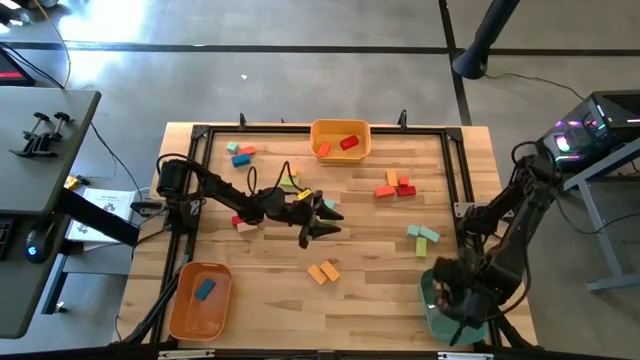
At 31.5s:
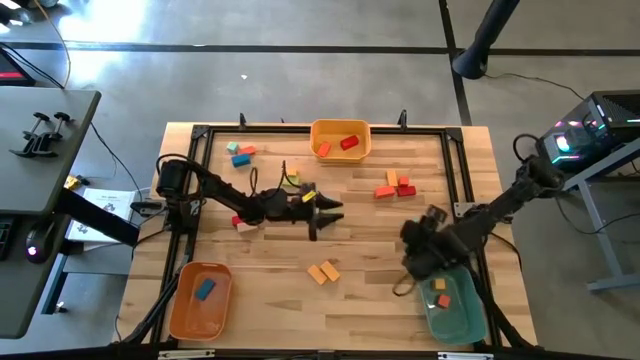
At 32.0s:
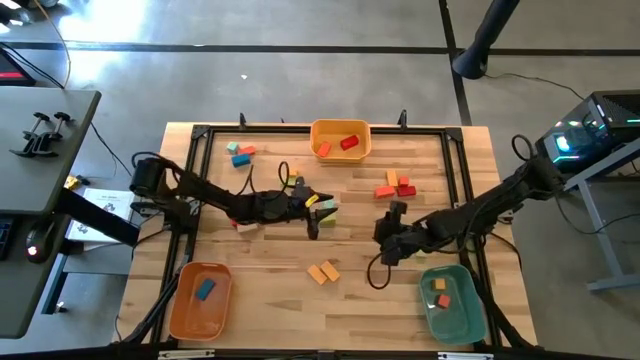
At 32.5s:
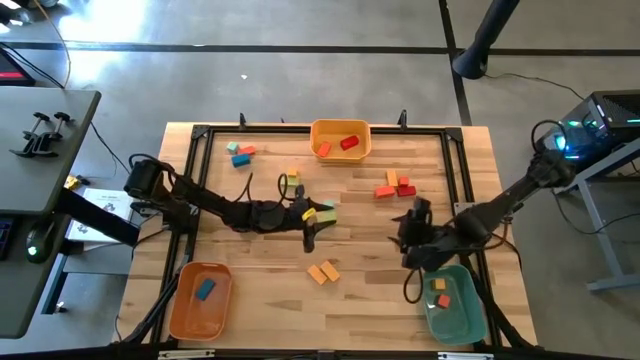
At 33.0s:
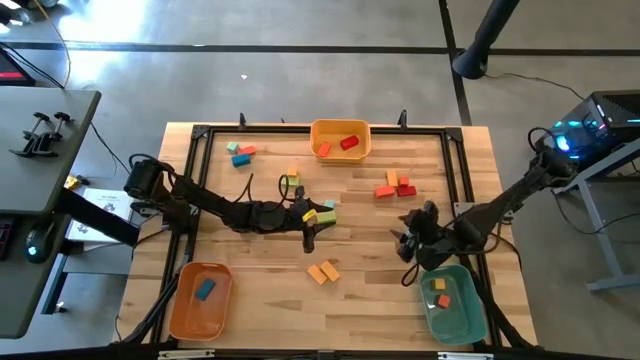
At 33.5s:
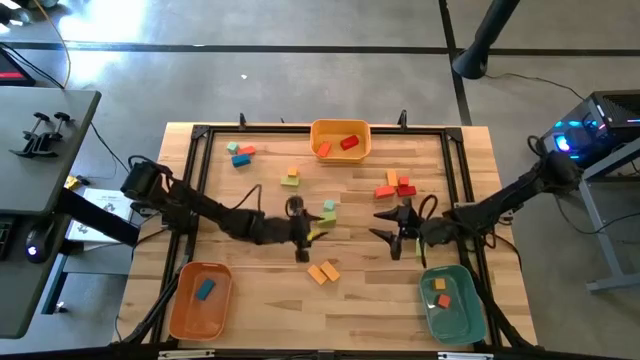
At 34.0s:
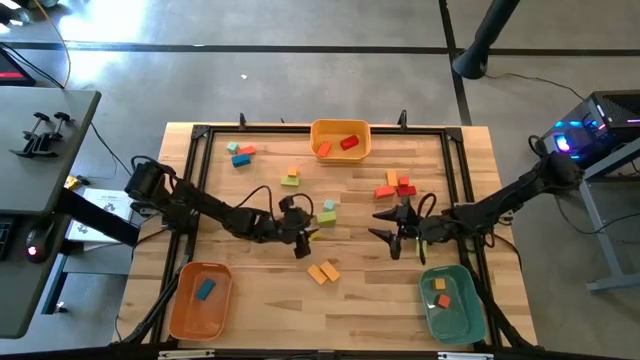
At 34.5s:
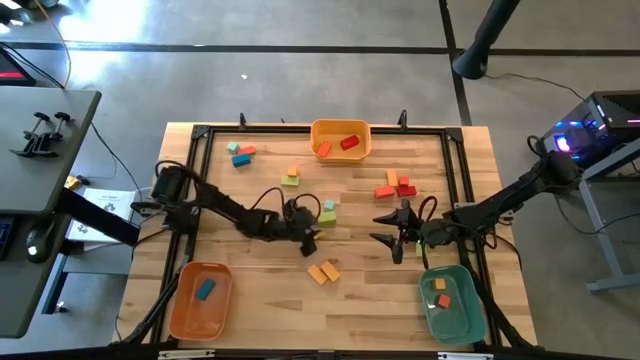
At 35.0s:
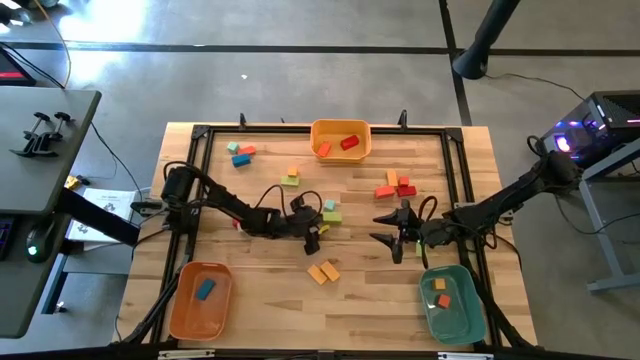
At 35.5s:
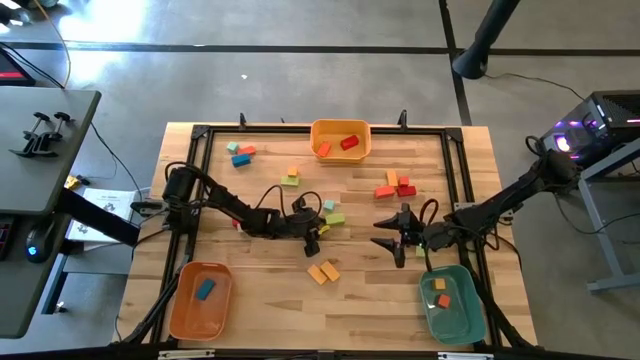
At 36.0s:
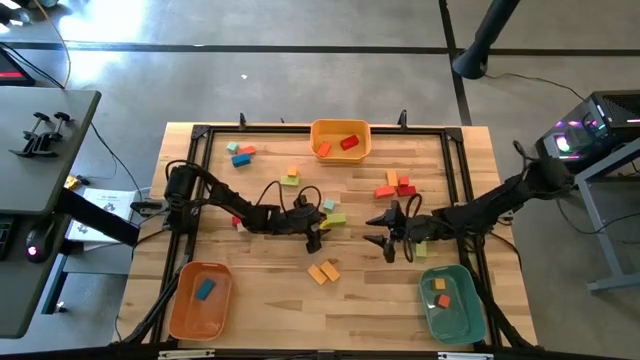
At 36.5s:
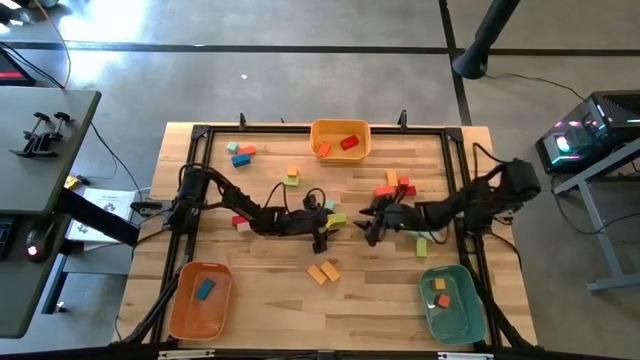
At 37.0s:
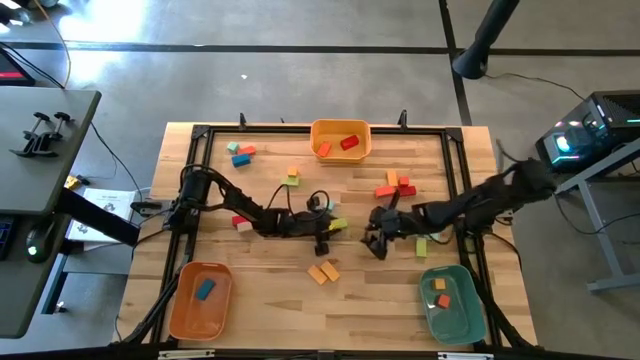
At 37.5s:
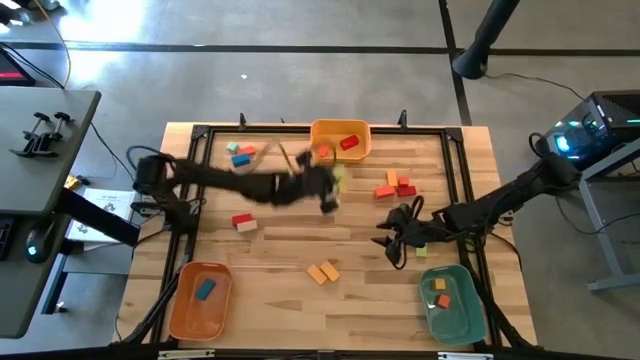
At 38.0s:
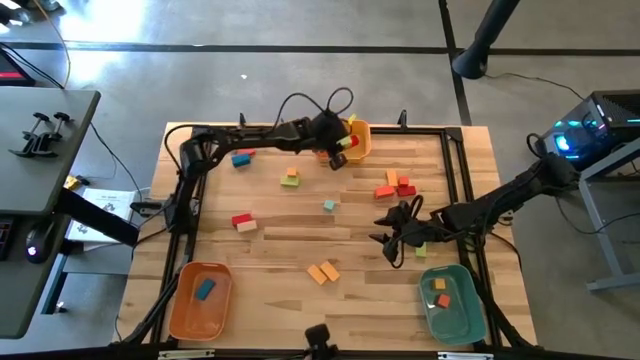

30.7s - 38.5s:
Task: Sort blocks by size
Put the green wide rectangular block into the yellow bin

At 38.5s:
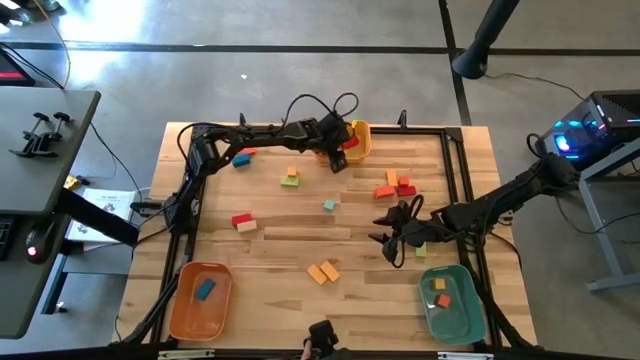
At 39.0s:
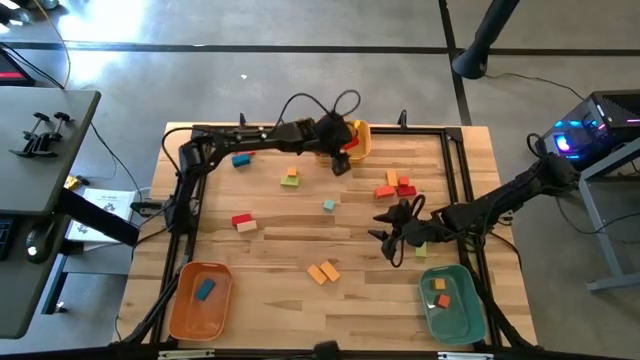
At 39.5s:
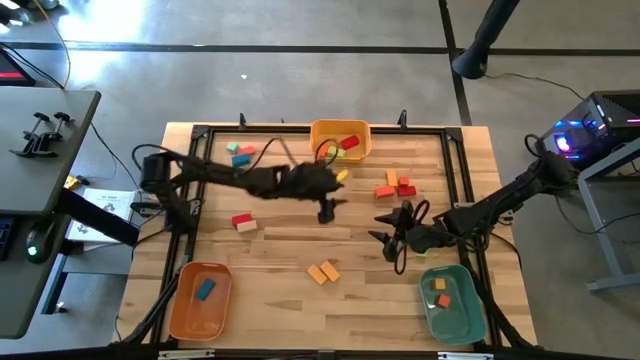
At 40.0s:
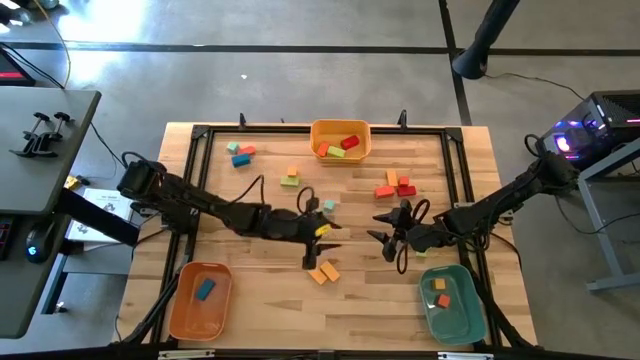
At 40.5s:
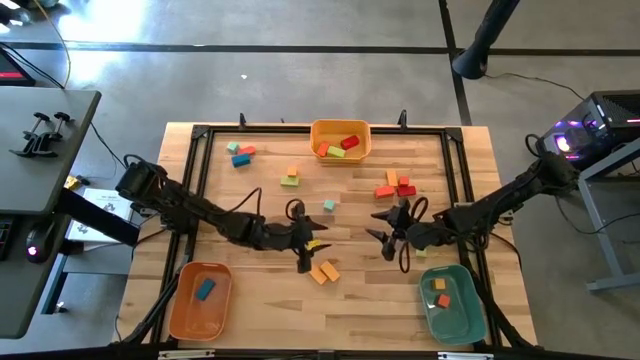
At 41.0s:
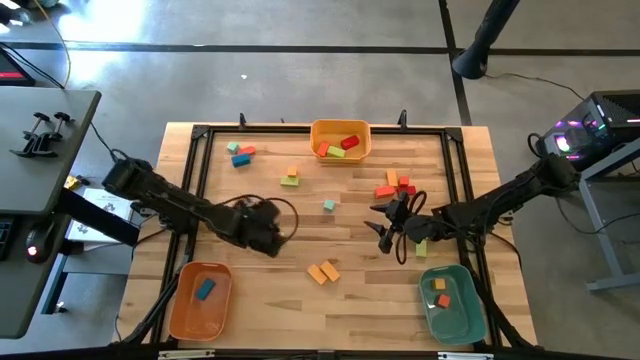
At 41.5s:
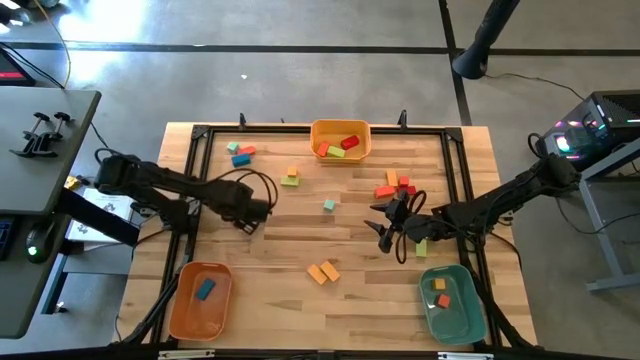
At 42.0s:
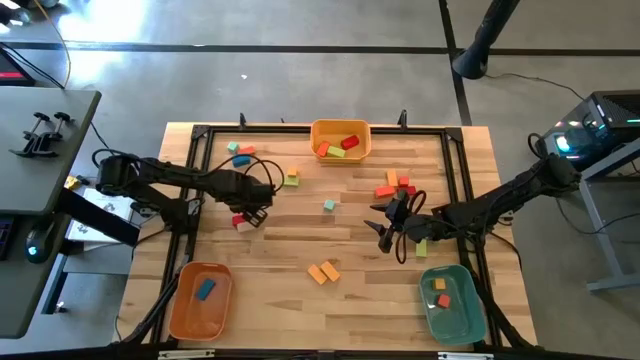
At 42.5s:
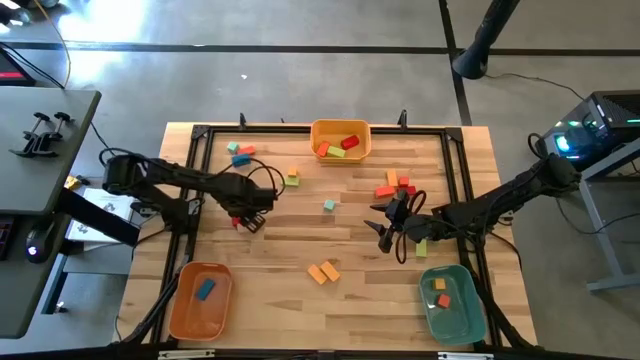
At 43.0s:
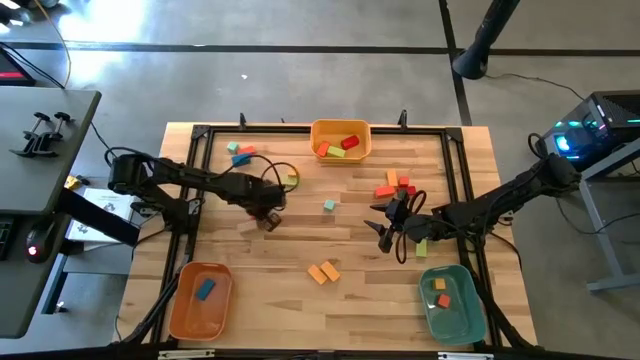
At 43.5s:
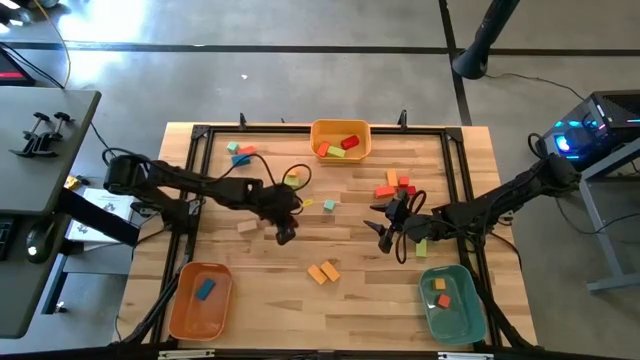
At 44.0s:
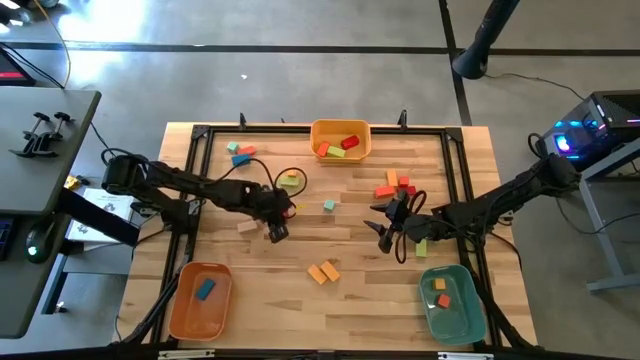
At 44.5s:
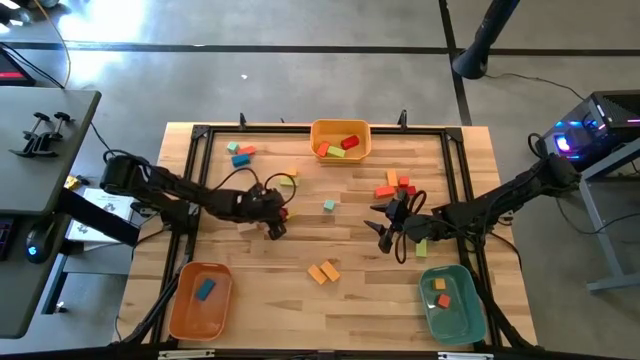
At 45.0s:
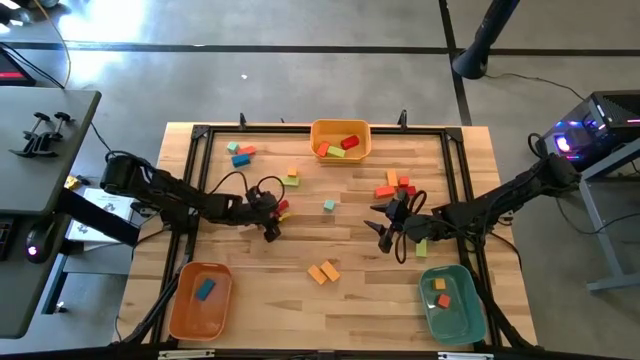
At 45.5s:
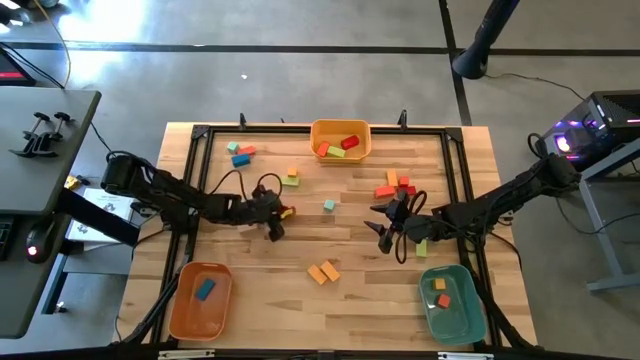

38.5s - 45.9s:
Put the left red narrow rectangular block into the orange bin

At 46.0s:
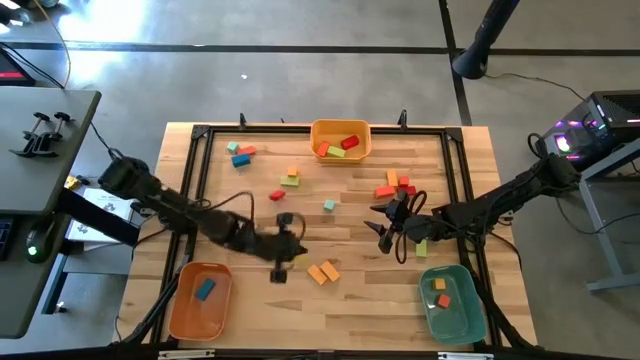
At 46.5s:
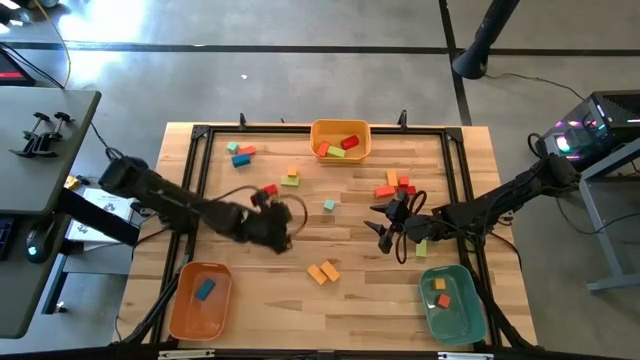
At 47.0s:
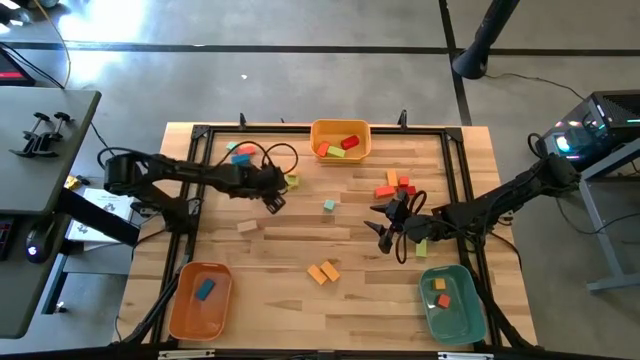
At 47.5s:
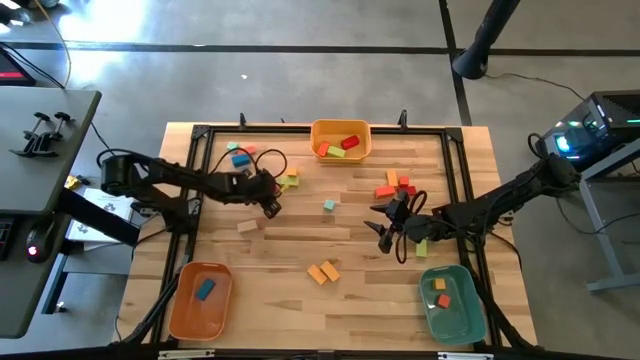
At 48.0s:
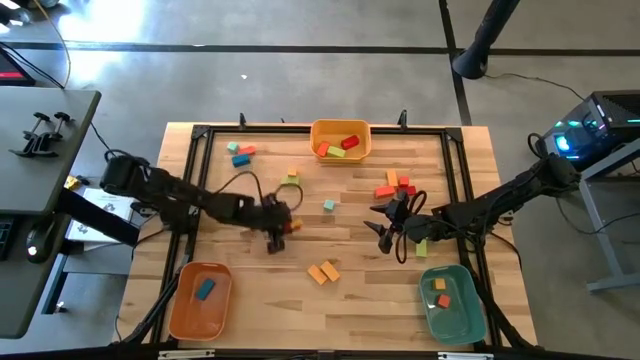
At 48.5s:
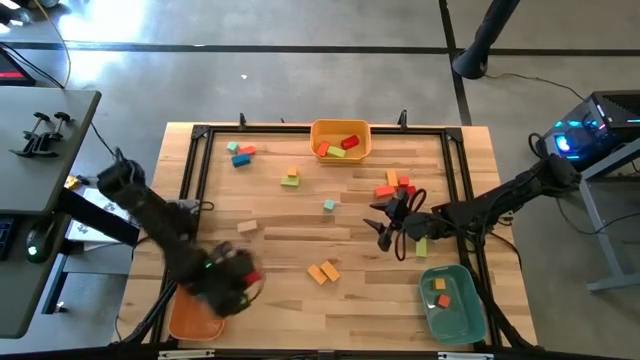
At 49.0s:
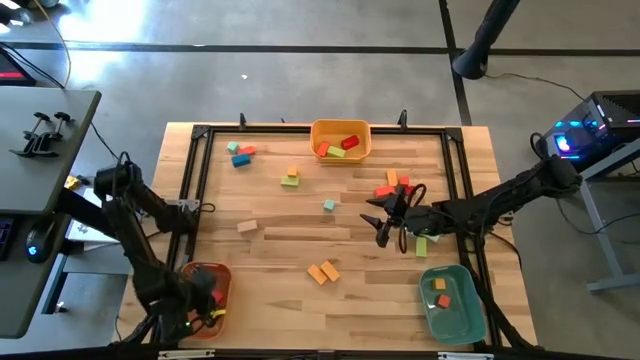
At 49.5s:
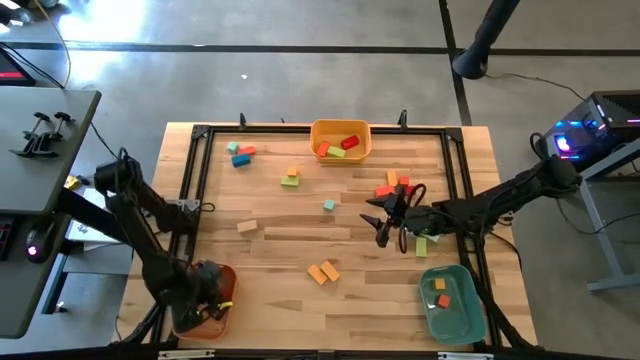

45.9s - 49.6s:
Put the left red narrow rectangular block into the orange bin

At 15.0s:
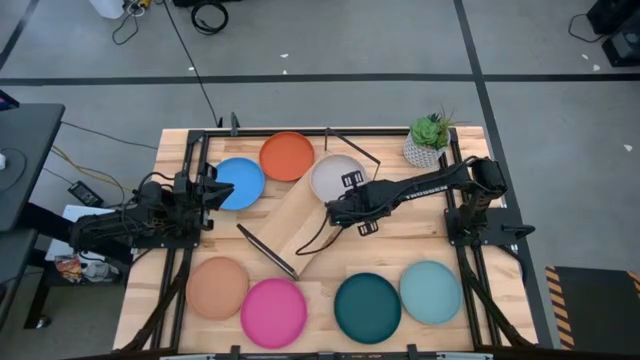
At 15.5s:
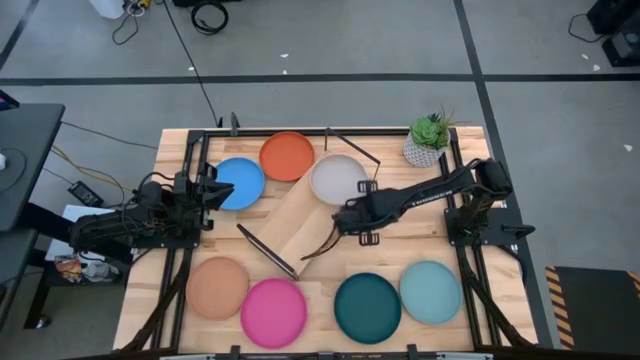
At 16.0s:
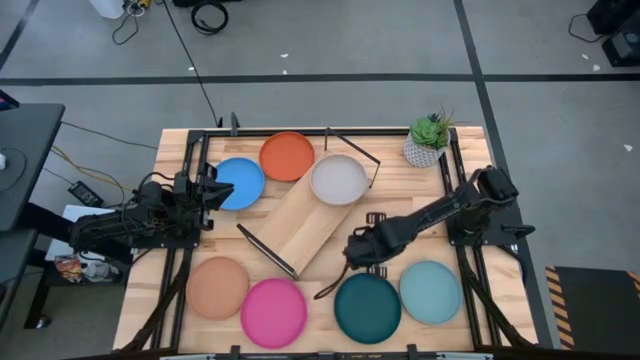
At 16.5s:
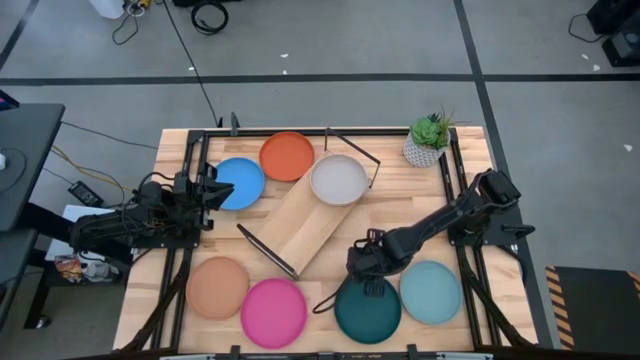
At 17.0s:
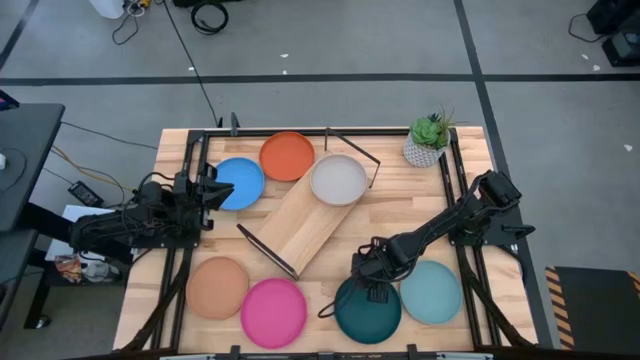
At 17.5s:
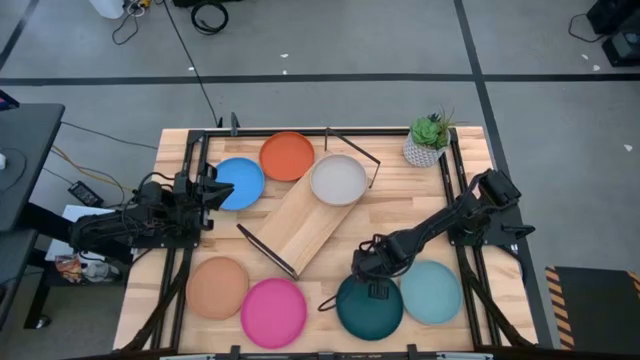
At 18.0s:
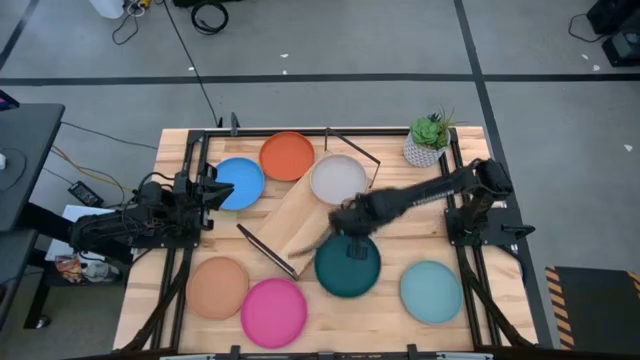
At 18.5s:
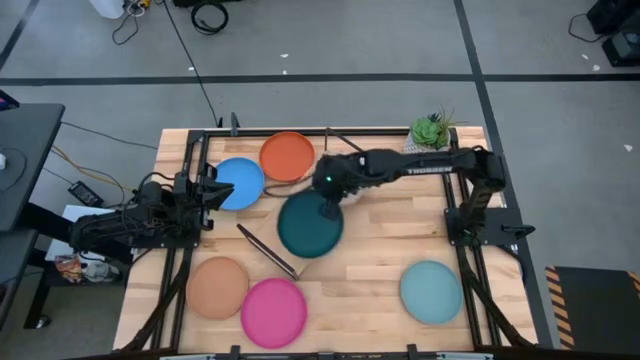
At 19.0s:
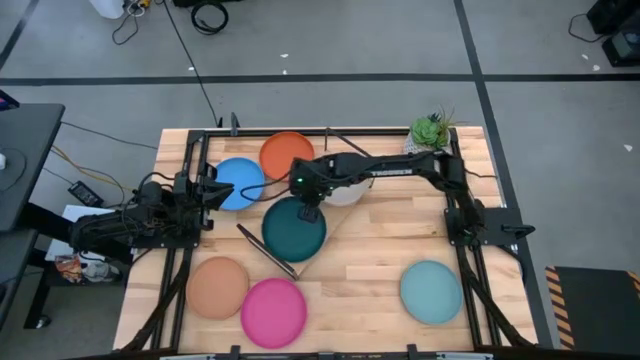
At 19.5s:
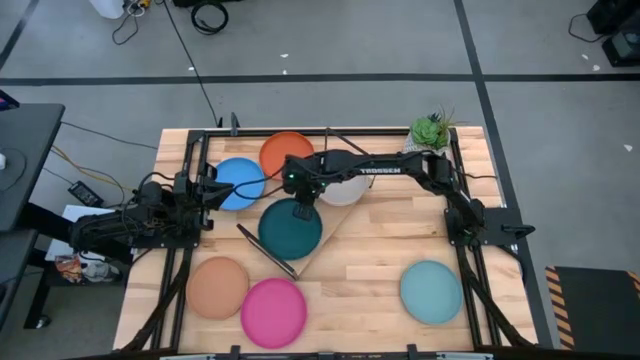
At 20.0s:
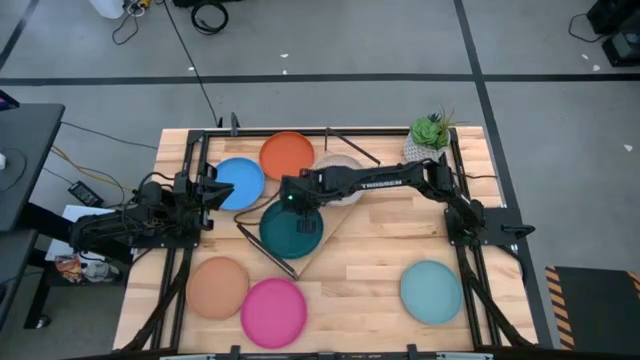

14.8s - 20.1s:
Task: Place and stack plates onto a shelf
Put the dark blue plate on the shelf
